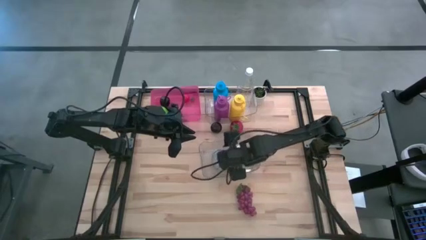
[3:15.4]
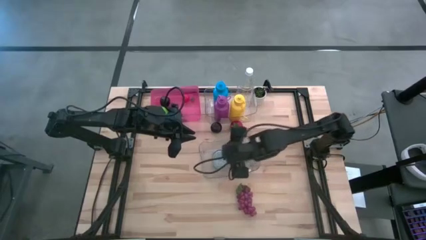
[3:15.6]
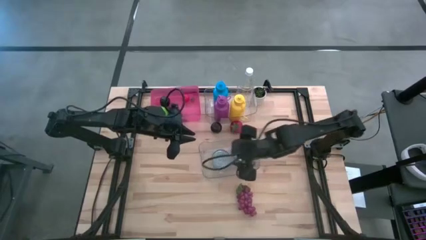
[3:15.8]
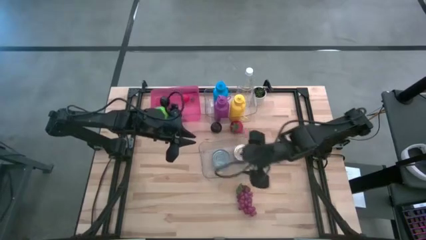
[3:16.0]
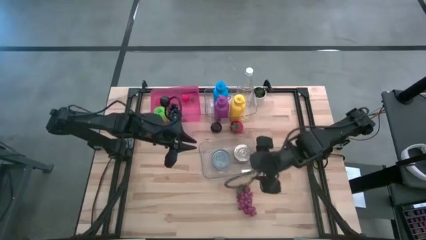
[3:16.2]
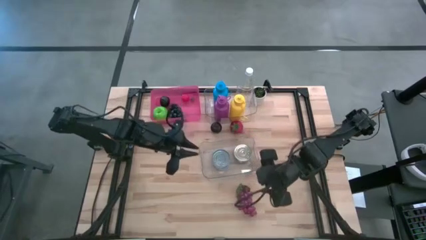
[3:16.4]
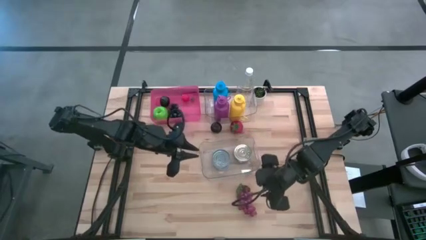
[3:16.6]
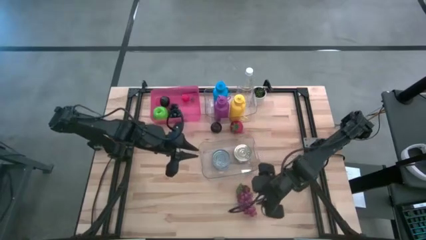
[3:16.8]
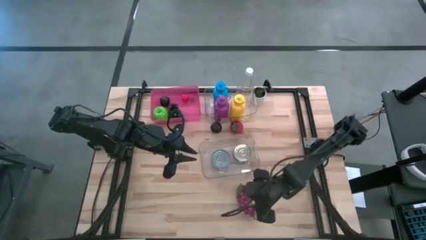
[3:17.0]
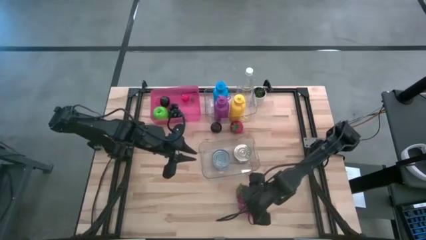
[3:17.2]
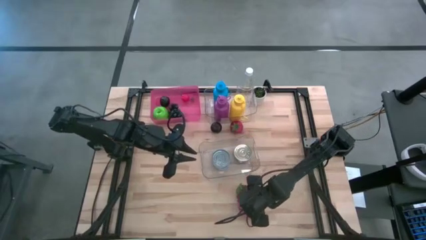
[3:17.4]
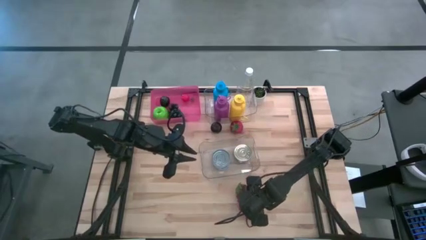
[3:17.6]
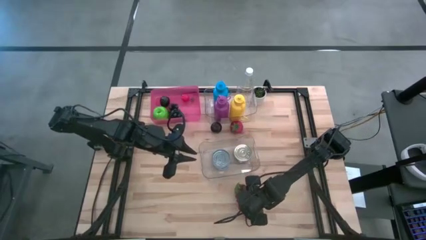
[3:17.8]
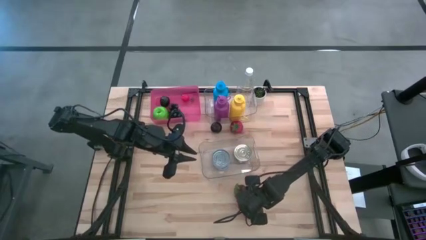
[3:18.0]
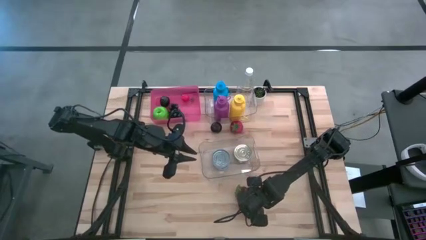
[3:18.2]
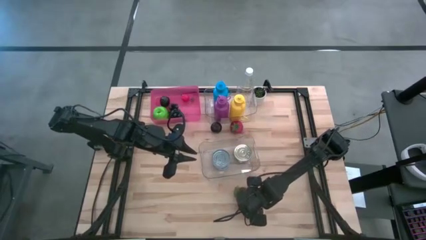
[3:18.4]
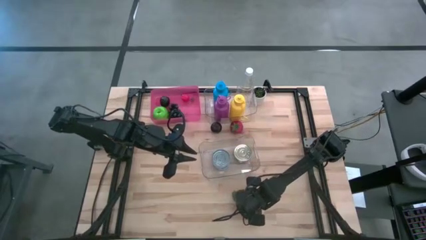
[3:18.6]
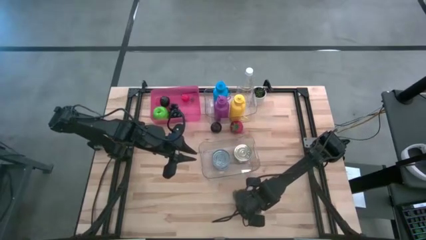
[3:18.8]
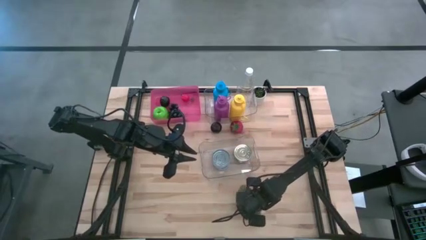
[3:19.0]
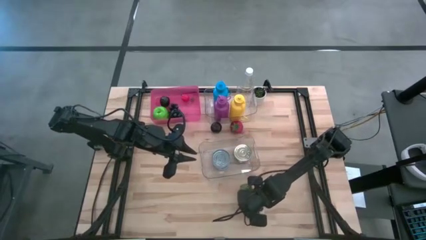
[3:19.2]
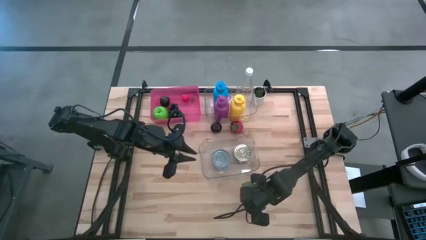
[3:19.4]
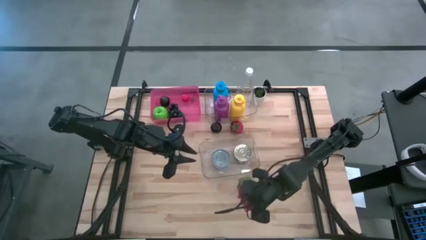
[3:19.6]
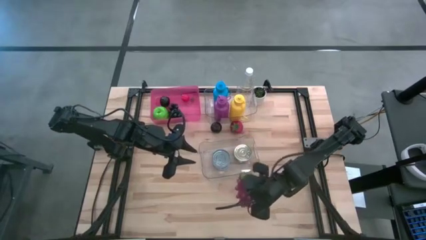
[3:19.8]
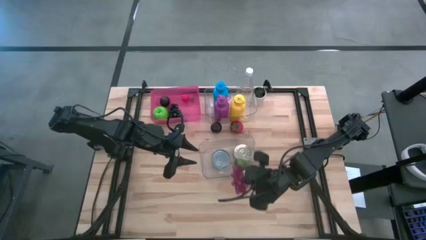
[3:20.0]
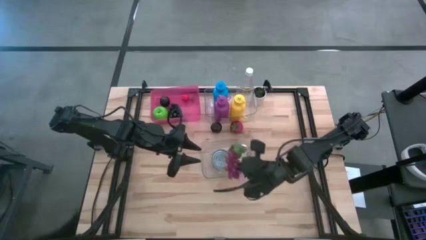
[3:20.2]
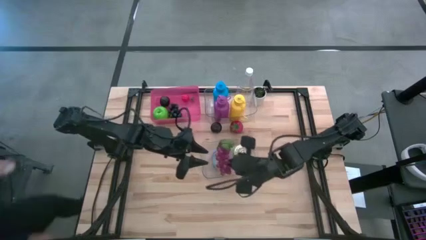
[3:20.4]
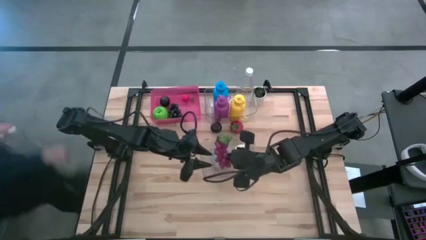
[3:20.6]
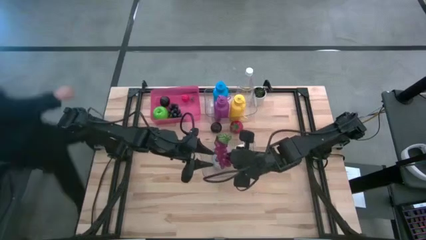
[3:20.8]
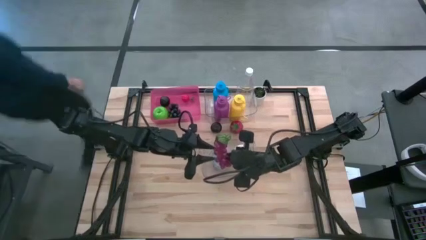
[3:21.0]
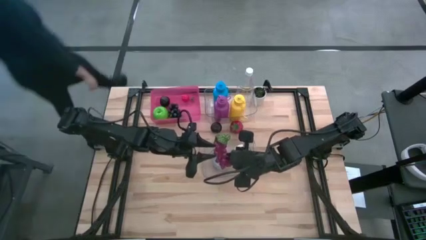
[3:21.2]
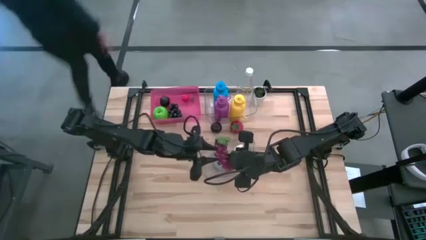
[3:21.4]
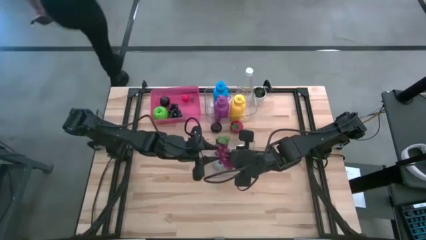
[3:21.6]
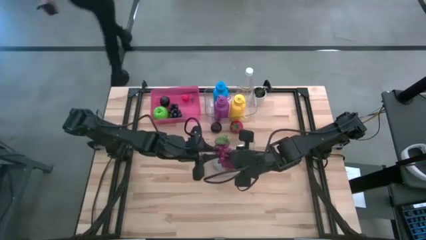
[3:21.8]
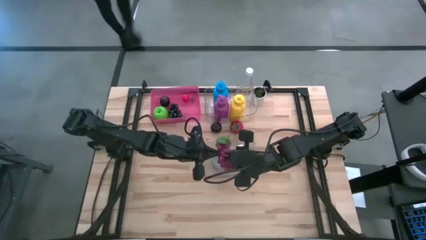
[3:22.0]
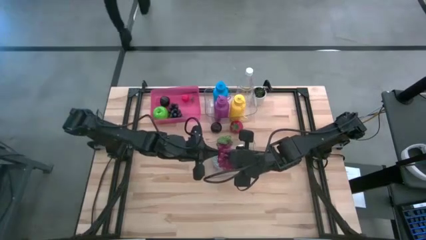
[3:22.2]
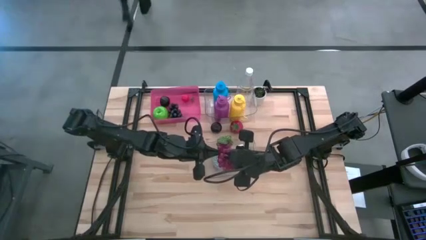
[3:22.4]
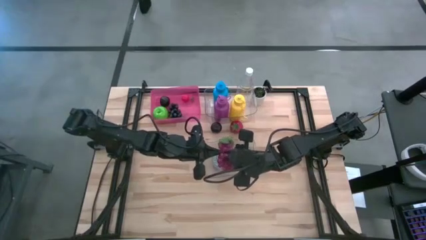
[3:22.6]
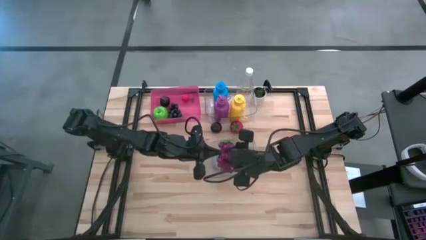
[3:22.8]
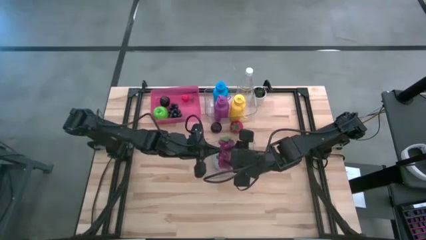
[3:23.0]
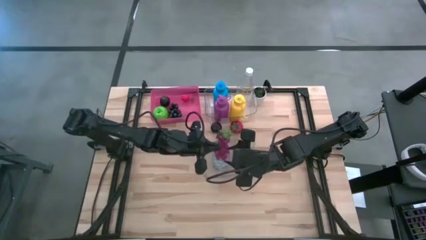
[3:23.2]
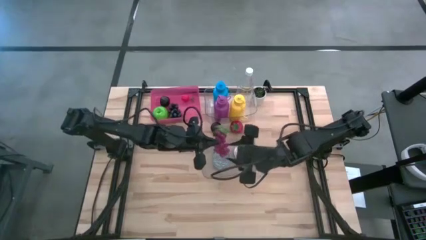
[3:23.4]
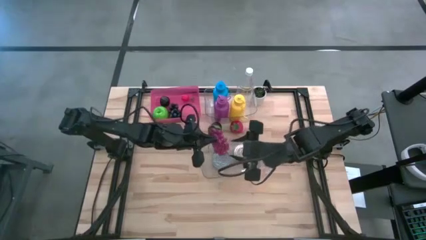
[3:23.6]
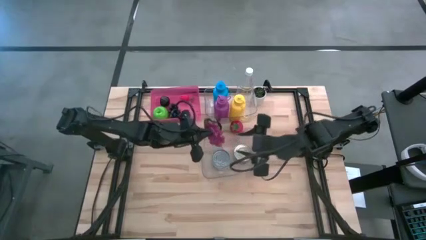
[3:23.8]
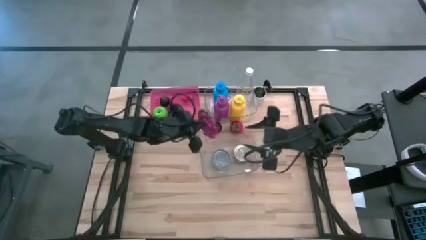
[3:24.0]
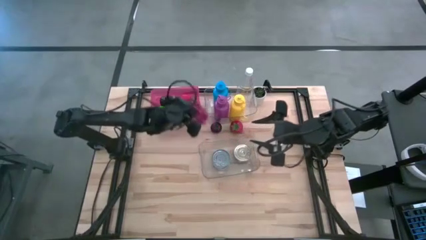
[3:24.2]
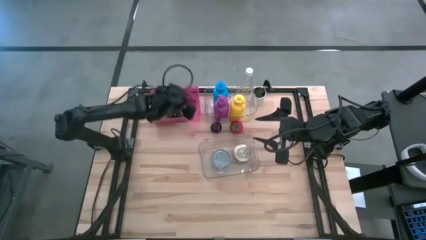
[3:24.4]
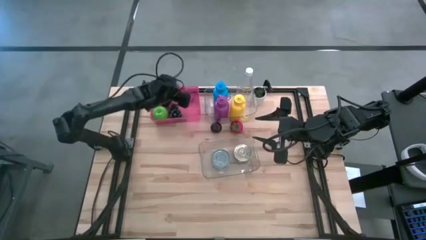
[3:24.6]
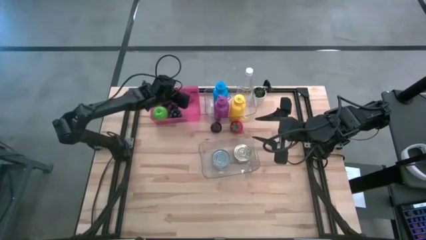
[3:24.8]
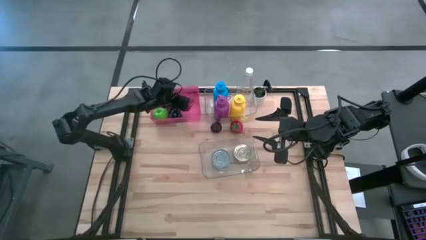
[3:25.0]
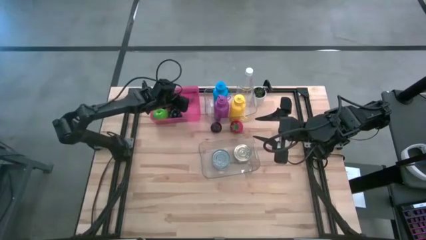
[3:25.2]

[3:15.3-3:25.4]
Task: Pick & Place Food Item
Put the purple grapes into the pink bin

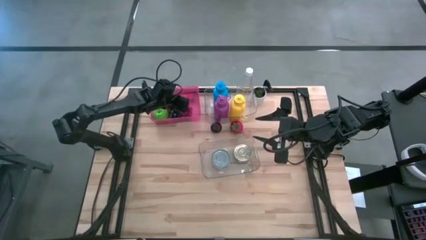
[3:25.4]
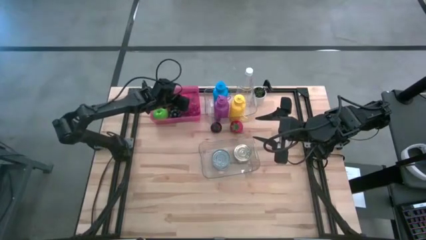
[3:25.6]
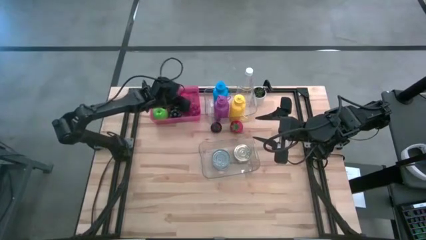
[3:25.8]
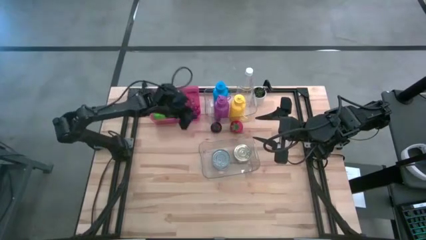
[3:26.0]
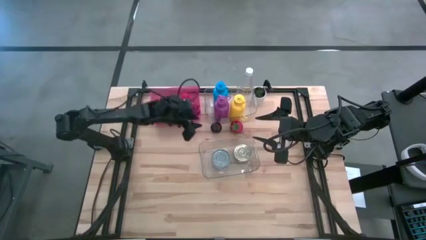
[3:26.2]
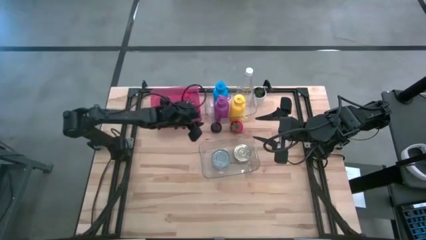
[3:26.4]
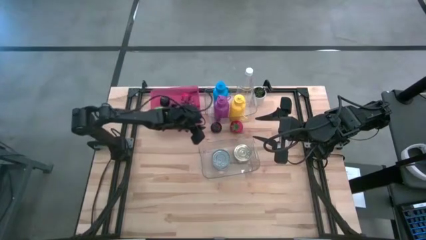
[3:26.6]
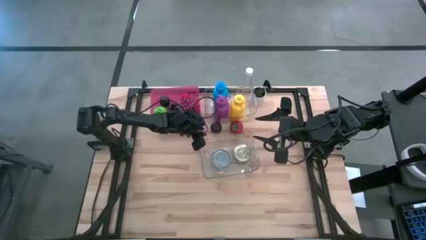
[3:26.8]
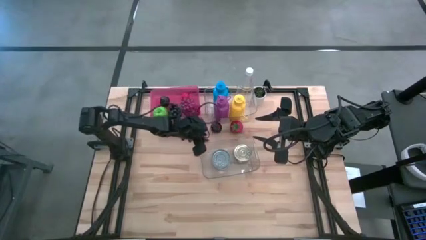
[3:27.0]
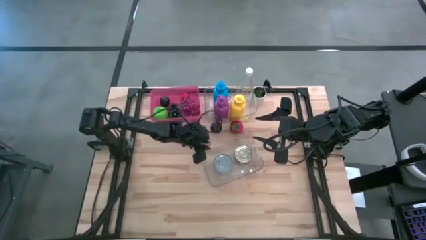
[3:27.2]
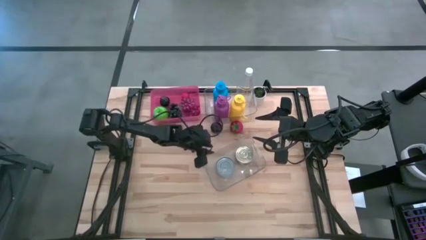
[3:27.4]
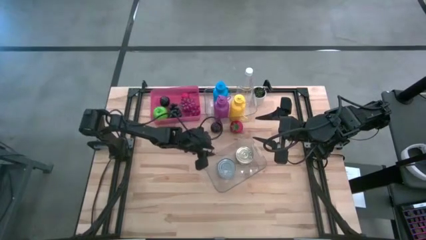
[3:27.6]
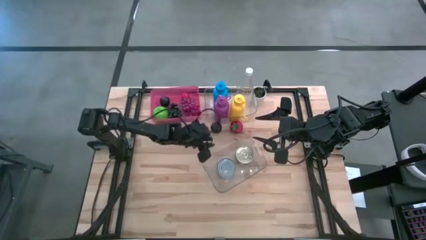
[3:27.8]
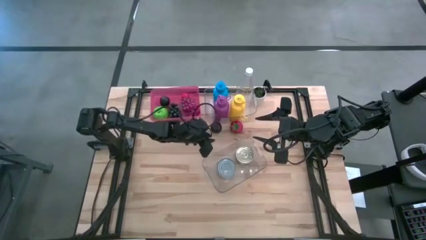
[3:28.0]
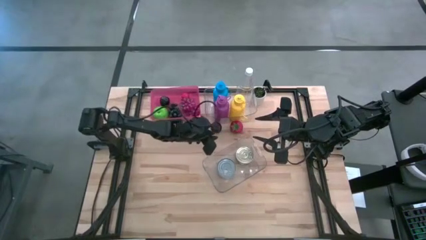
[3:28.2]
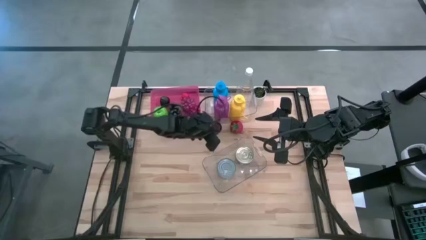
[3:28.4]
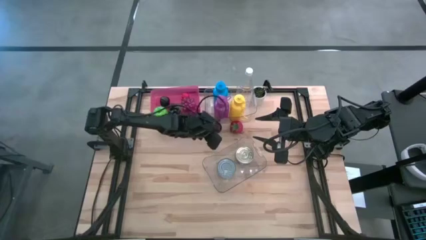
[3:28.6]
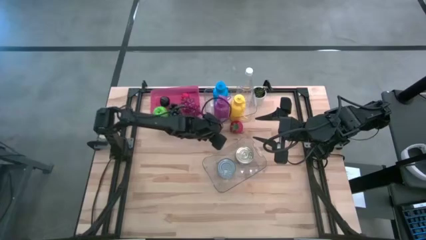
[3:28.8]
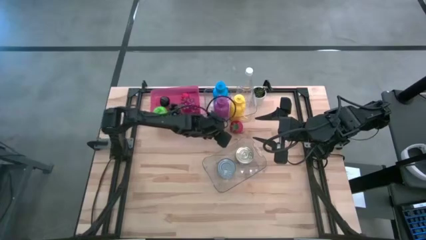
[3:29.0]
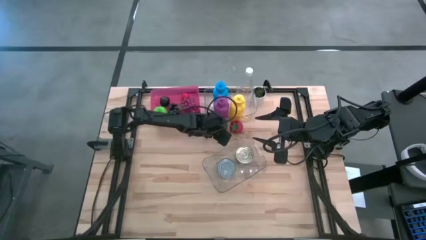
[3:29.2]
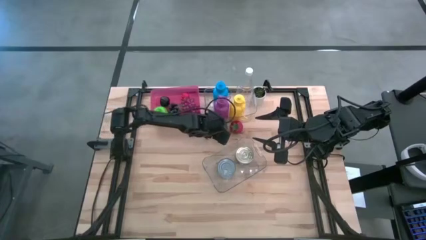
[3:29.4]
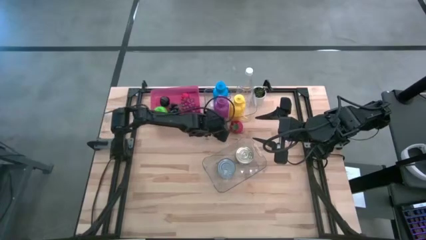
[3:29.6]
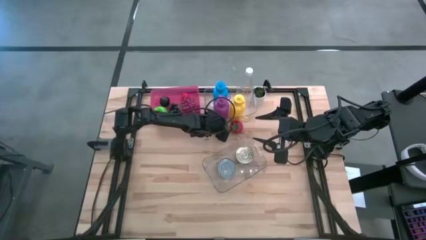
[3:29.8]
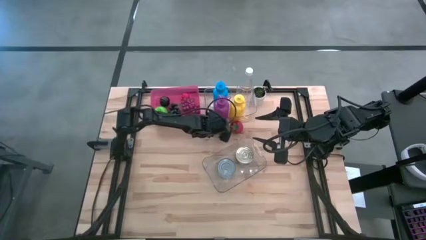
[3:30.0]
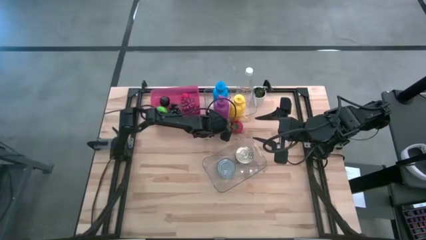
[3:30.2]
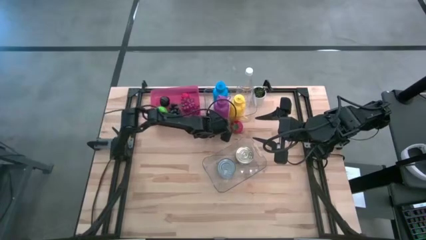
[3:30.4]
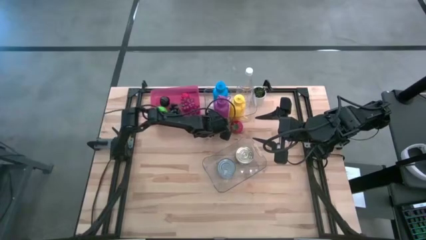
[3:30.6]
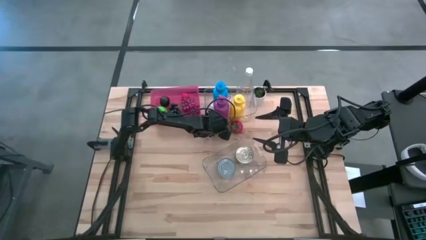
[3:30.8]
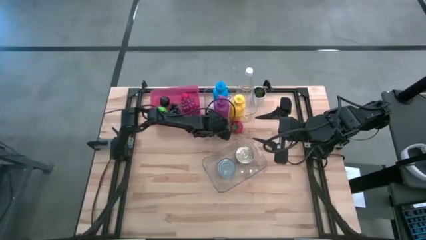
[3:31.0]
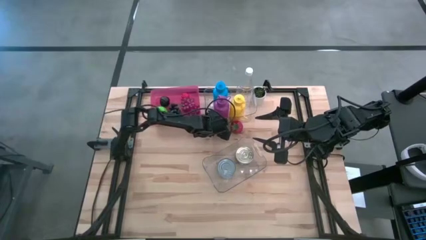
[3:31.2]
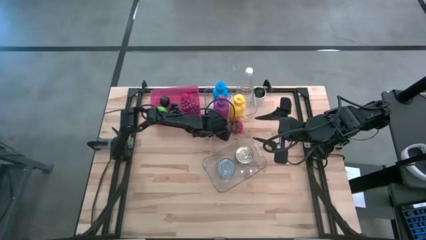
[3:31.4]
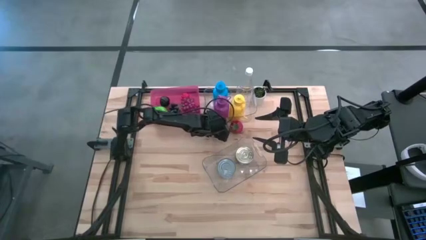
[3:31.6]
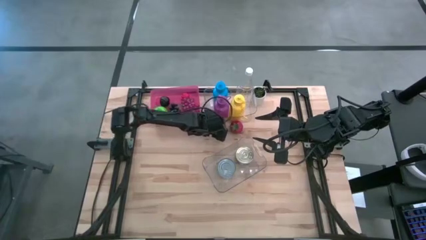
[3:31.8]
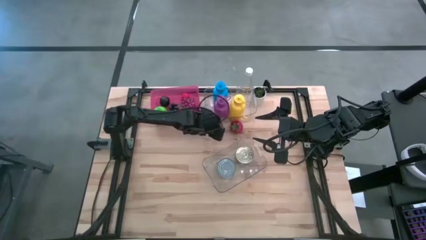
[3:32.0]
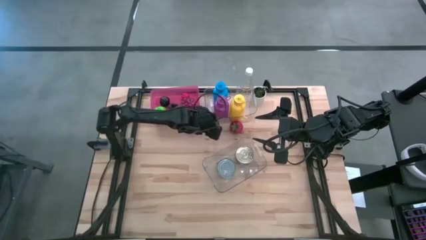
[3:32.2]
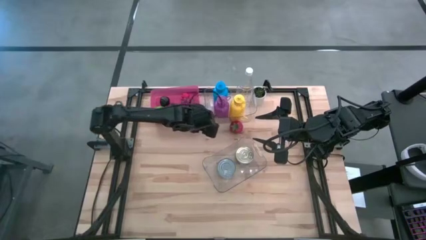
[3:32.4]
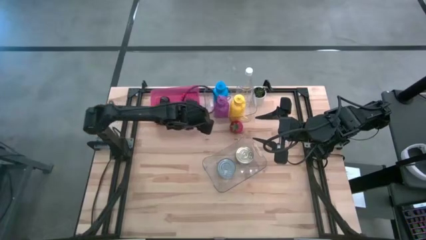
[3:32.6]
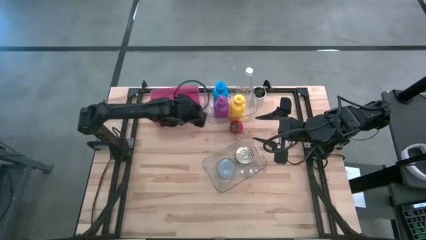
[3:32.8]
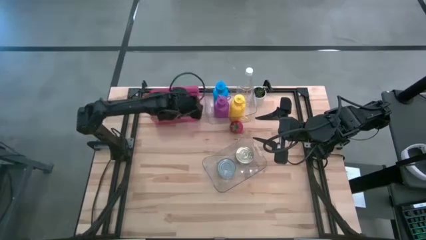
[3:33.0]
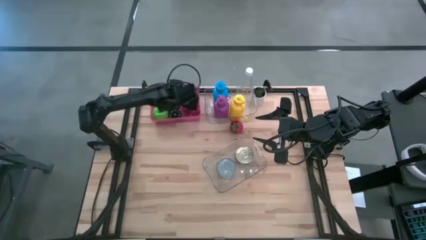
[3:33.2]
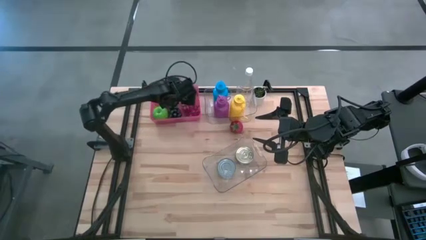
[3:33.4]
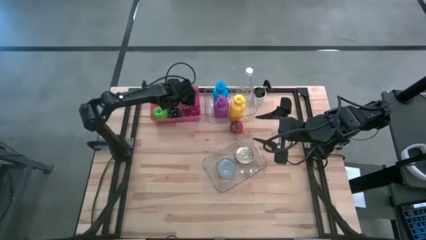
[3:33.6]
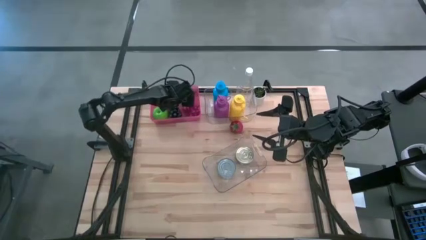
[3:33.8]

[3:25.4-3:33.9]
Put the plum into the pink bin
